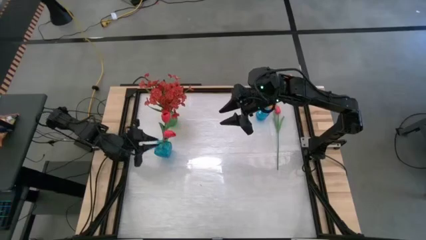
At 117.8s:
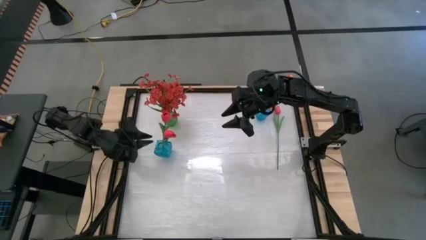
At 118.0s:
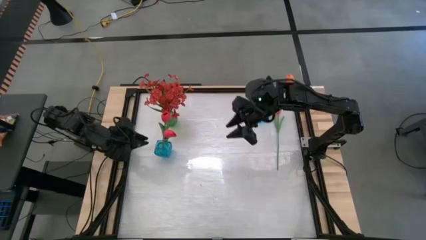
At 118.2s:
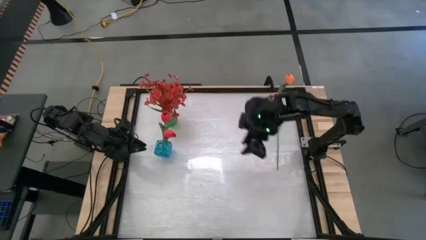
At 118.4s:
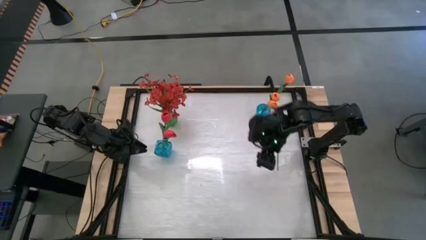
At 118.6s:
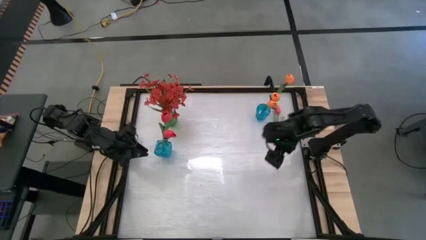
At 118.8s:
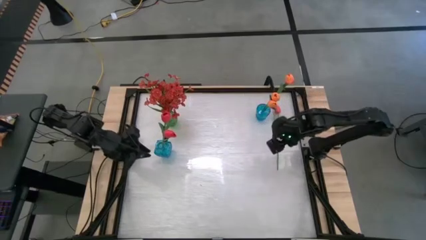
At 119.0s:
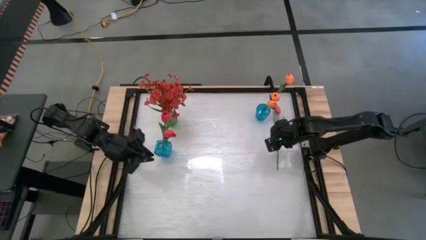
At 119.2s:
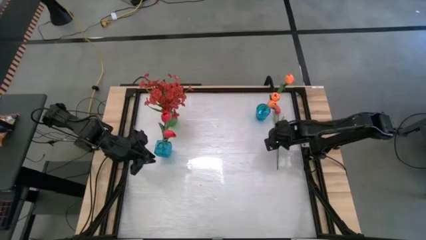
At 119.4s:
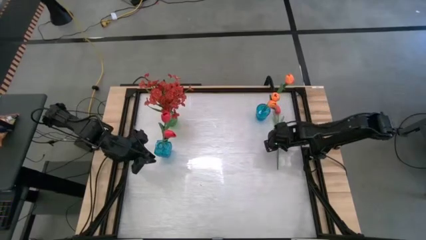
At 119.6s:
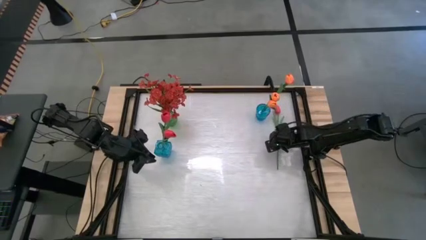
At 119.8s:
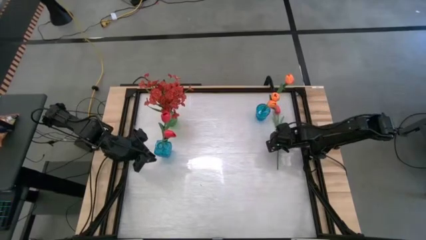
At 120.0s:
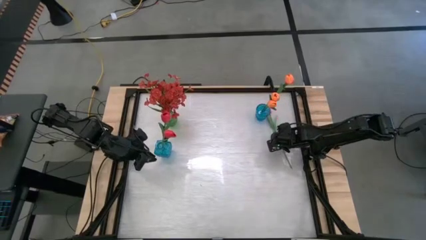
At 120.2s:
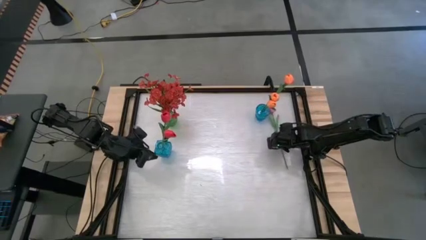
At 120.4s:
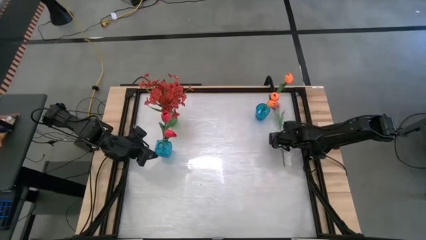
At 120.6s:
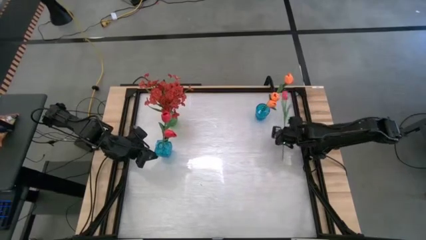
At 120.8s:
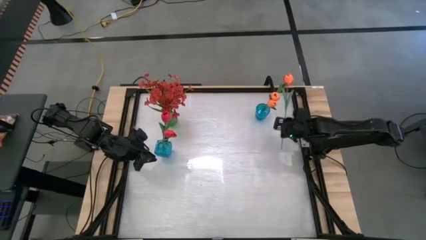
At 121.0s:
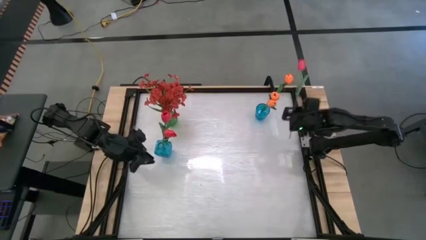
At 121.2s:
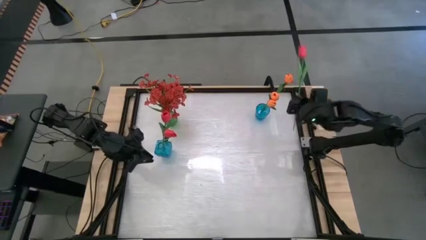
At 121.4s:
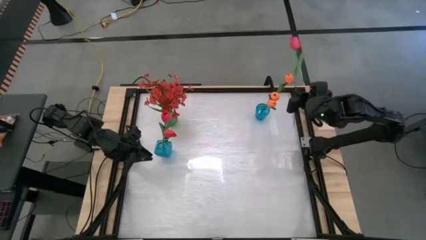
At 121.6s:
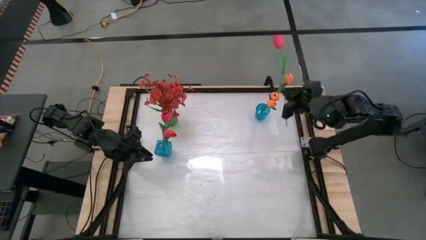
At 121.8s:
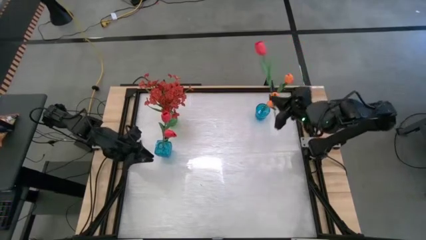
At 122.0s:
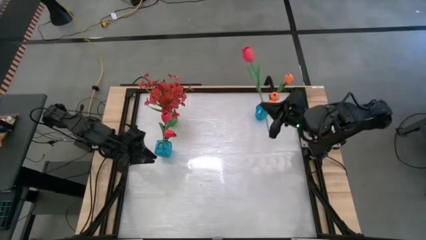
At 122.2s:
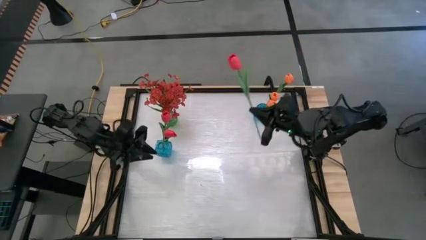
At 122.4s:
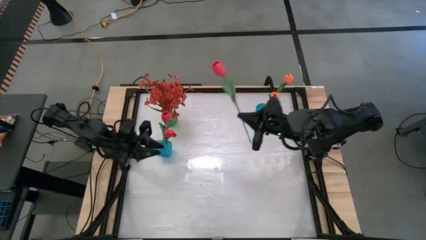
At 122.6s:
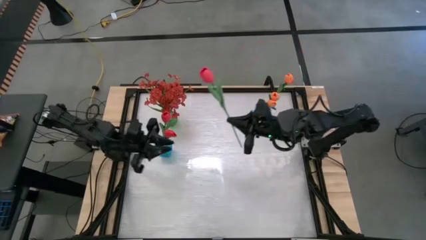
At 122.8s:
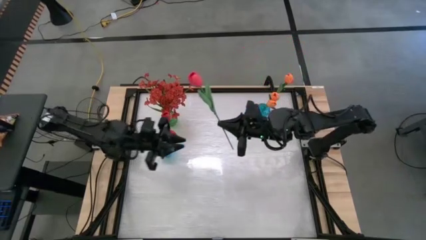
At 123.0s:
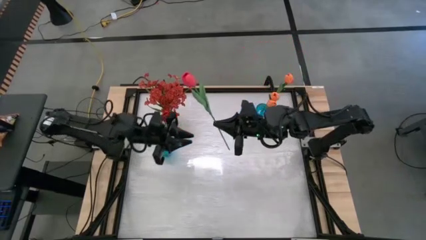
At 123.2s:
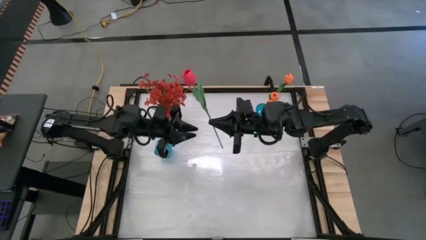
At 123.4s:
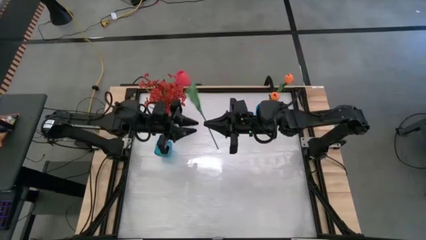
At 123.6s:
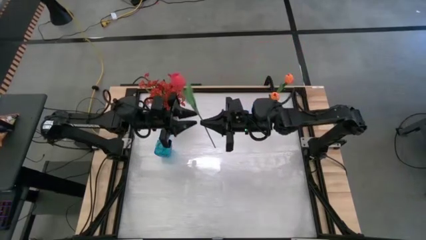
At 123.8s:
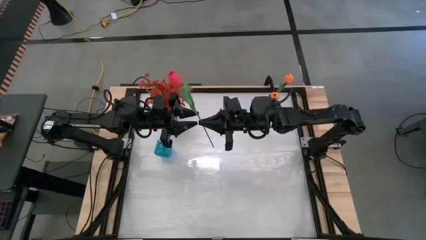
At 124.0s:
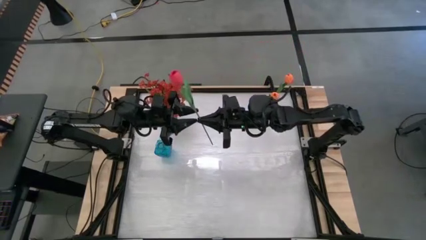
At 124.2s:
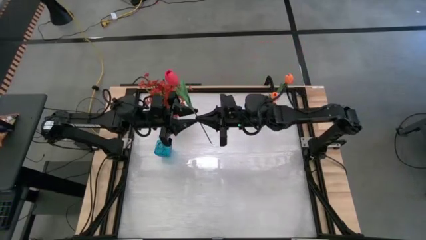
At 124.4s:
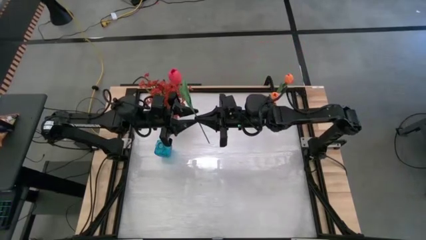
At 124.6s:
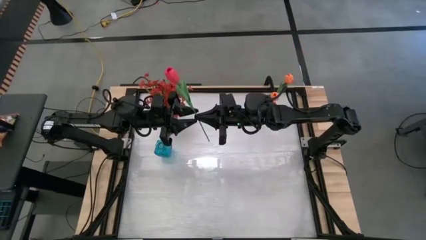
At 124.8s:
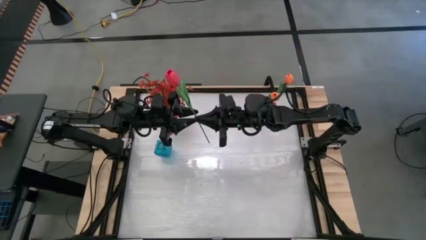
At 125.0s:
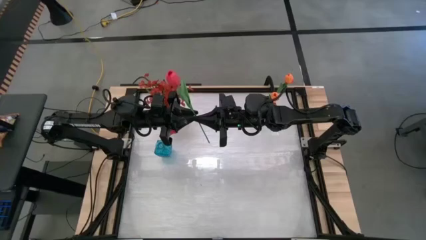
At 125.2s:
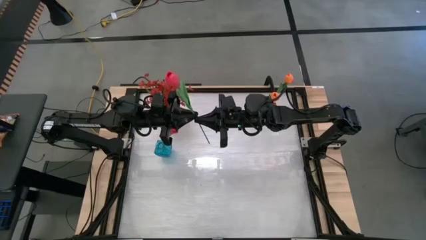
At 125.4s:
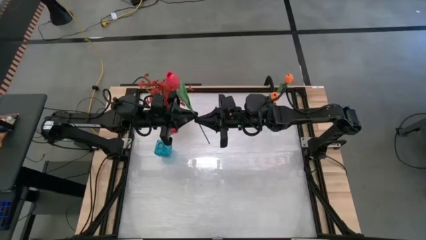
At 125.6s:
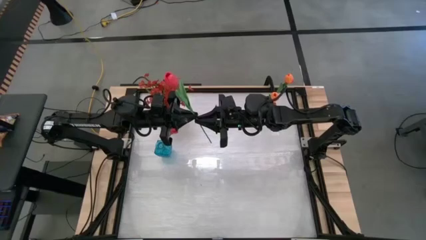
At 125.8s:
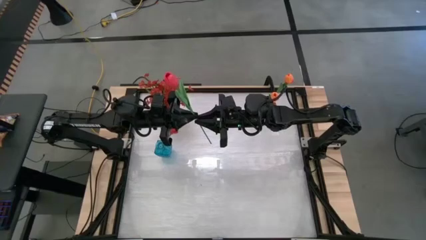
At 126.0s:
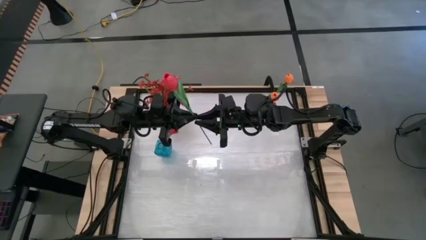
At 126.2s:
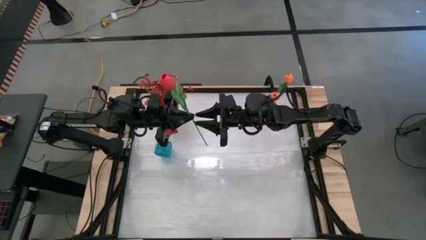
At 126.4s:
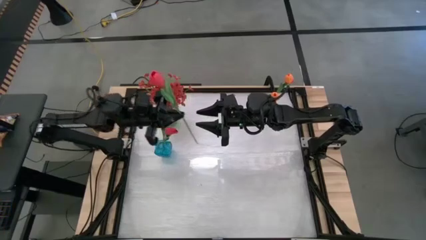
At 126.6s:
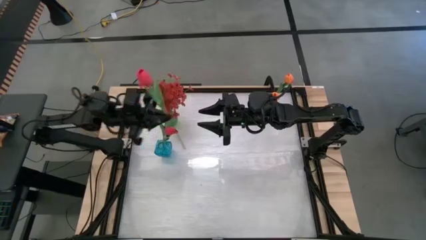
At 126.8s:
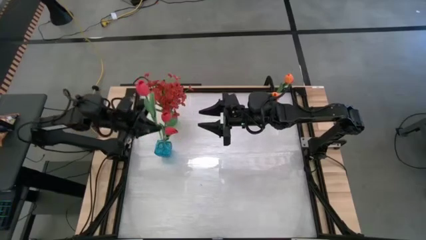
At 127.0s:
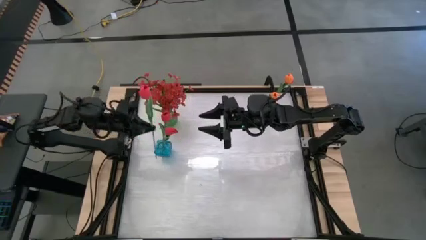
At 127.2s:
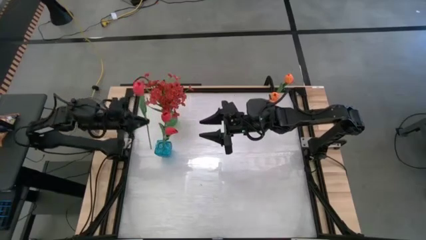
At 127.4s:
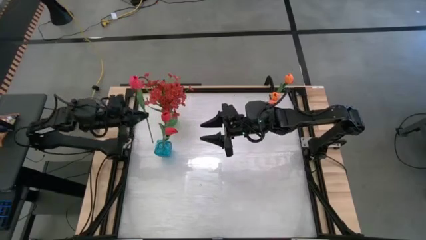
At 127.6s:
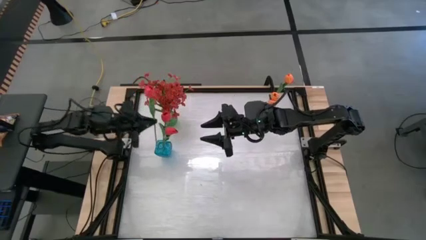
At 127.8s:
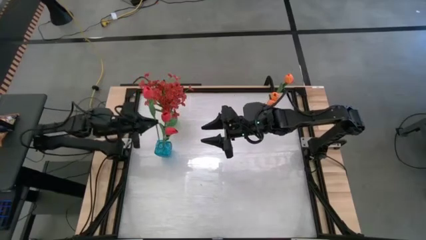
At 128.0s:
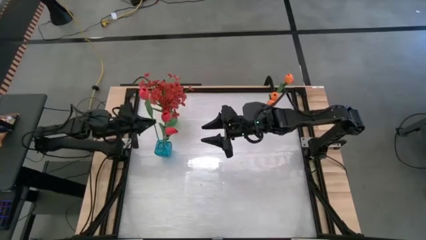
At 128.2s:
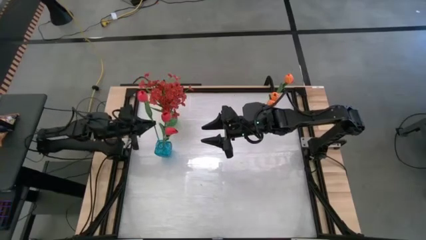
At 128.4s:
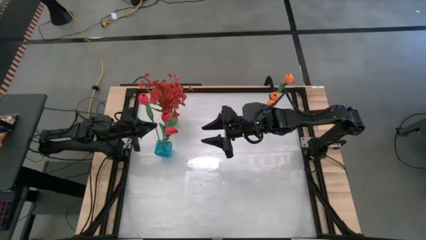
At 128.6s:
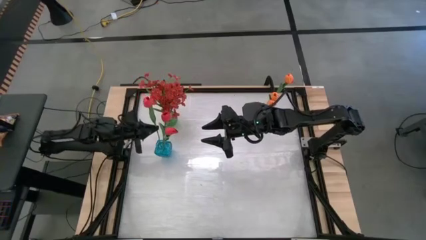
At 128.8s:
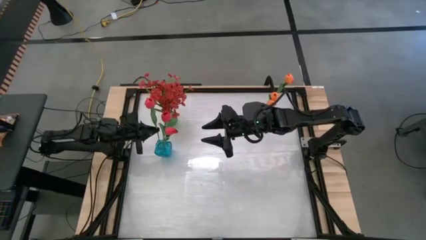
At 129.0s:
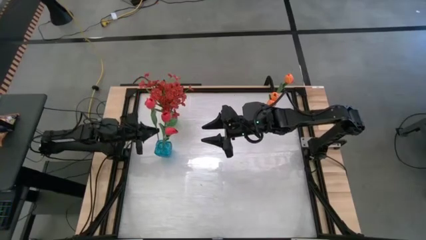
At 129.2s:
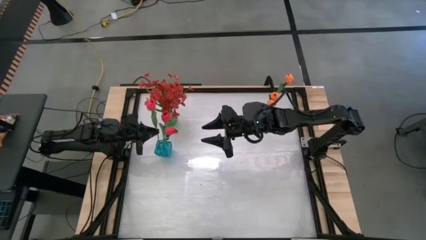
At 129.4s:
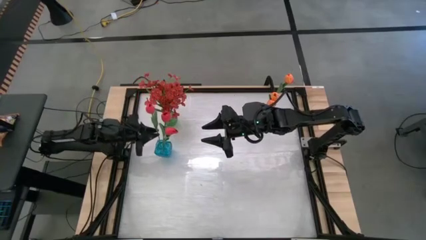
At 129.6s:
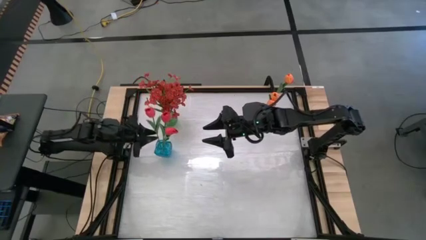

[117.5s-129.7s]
Task: Sort flowers into vase by color
Put the red tulip into the left blue vase

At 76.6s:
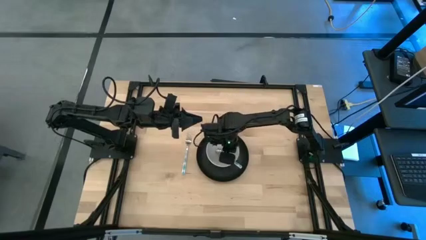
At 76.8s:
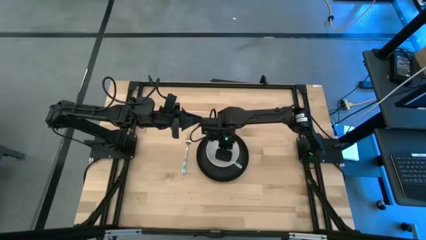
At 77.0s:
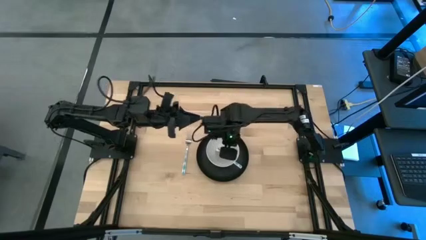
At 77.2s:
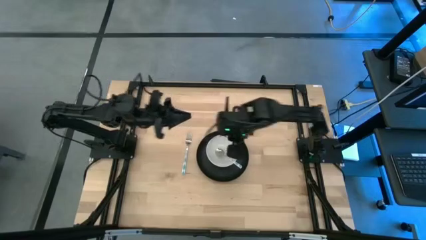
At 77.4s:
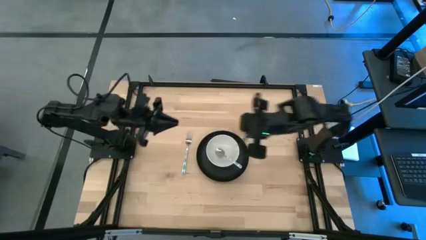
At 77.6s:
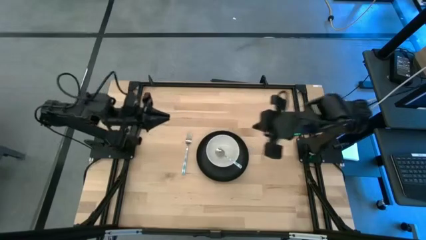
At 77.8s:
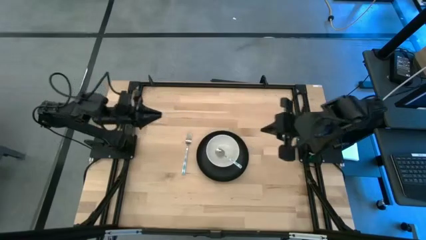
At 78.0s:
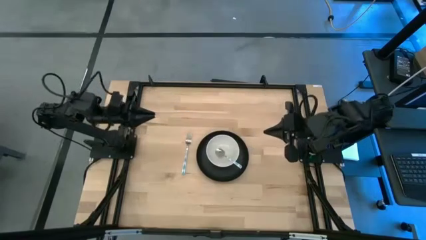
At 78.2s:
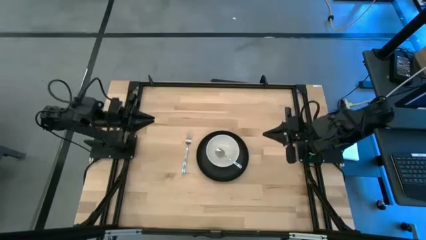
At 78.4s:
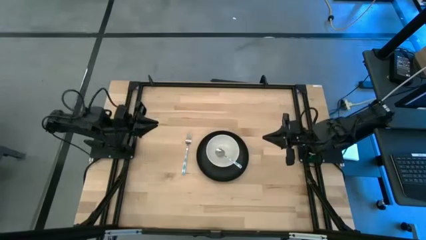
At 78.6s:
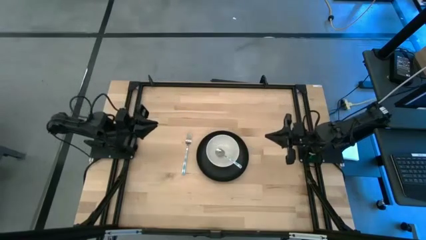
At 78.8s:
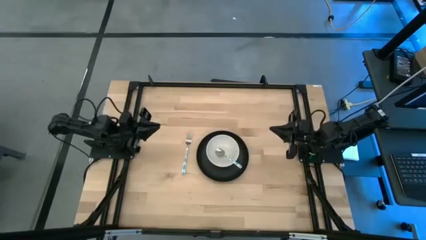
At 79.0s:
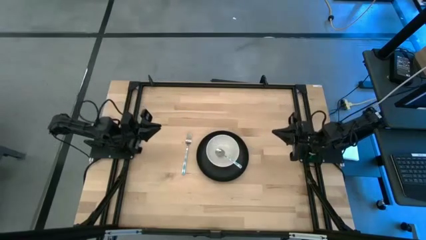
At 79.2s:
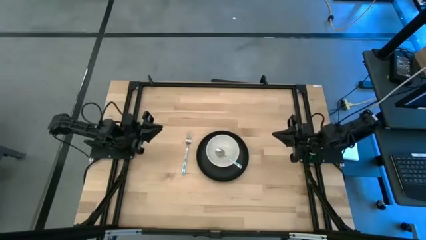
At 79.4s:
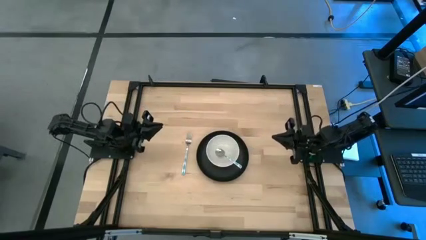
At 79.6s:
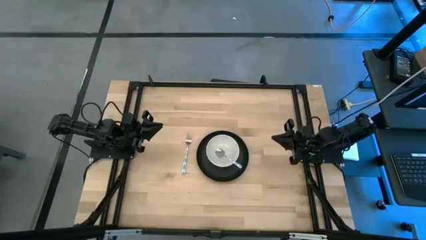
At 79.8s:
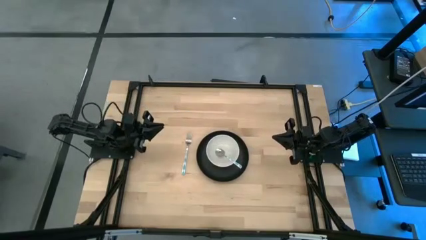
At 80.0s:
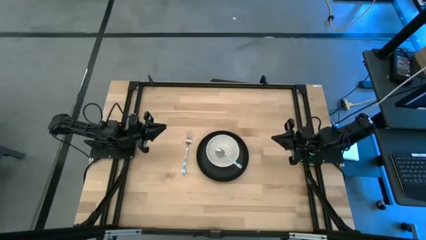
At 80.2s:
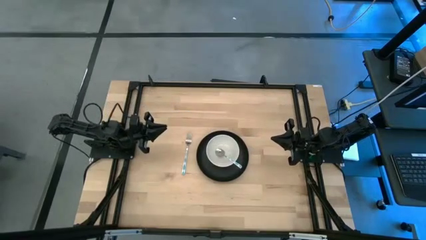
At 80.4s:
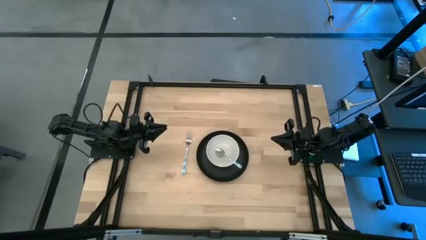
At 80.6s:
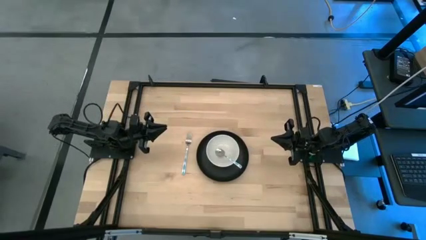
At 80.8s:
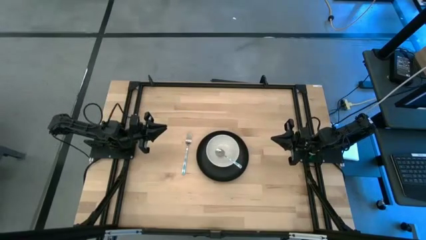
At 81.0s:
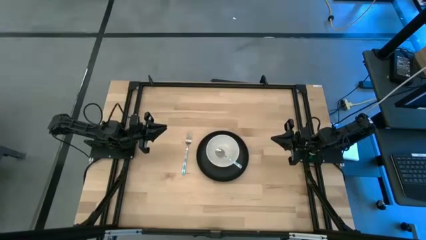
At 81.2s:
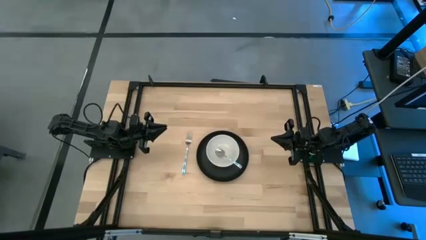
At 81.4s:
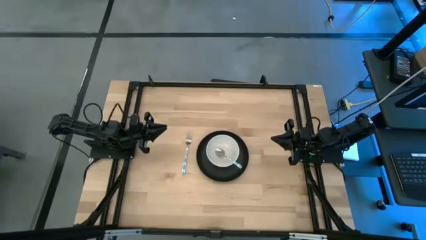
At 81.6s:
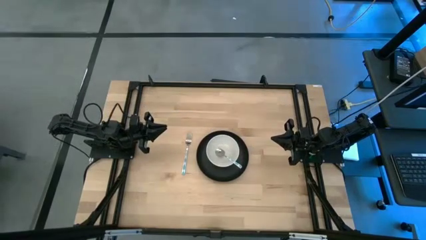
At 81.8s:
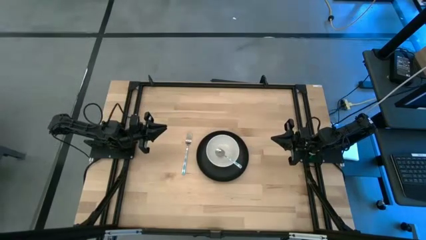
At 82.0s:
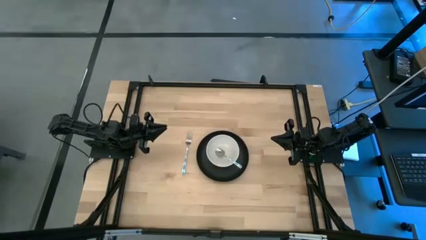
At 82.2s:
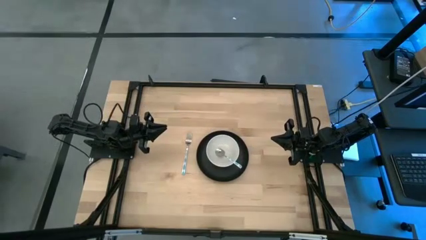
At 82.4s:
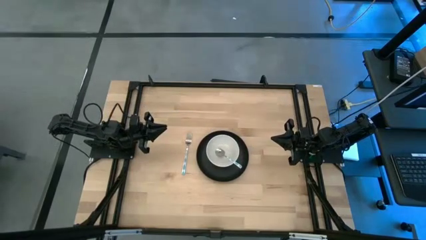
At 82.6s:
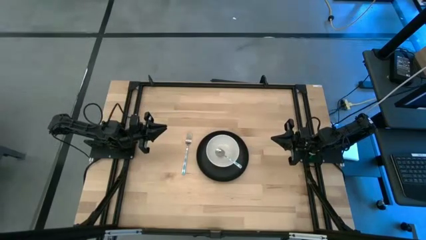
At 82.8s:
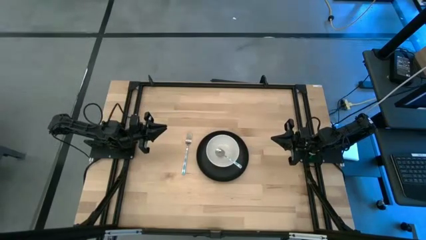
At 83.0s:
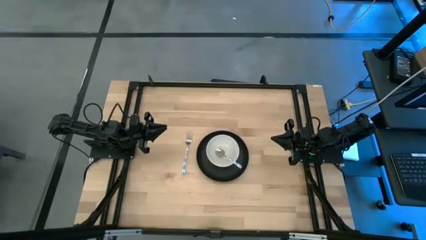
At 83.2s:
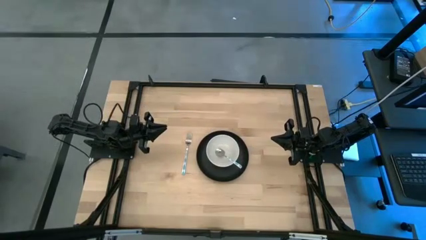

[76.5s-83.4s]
Task: Set table place
Return to Home Position
